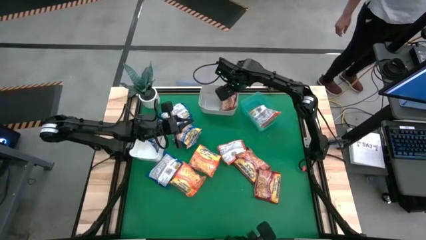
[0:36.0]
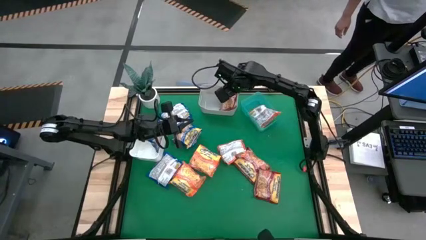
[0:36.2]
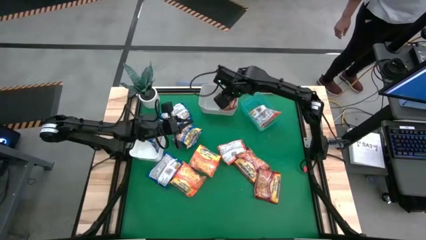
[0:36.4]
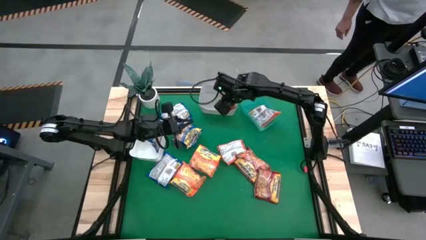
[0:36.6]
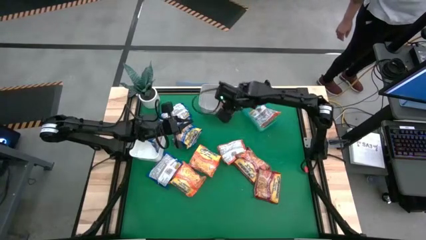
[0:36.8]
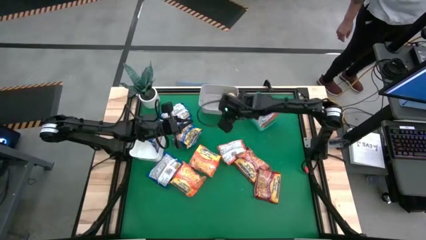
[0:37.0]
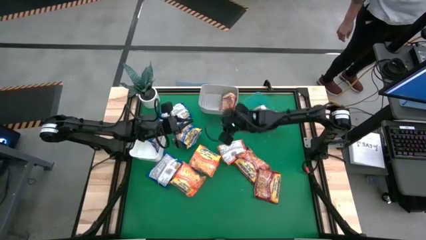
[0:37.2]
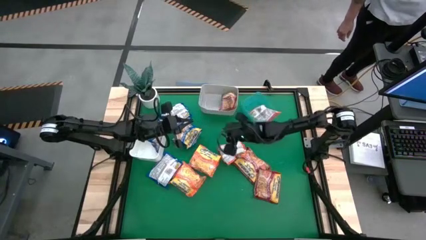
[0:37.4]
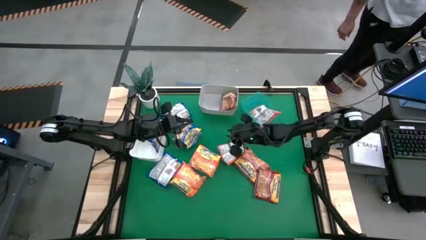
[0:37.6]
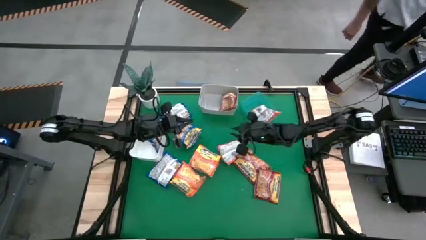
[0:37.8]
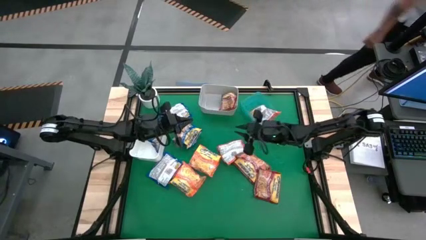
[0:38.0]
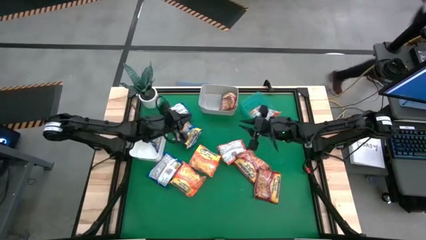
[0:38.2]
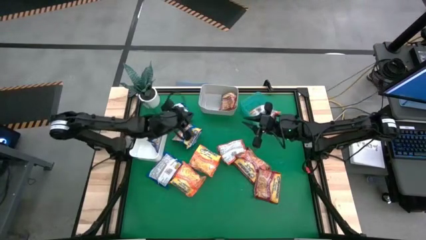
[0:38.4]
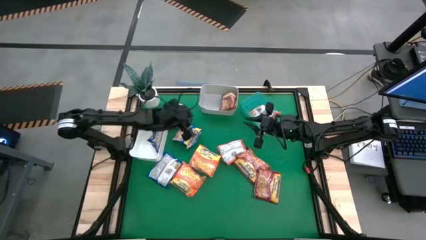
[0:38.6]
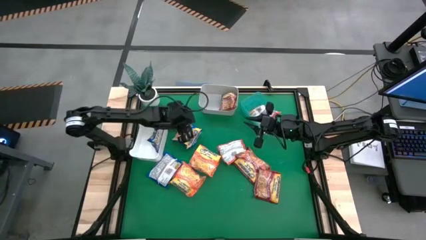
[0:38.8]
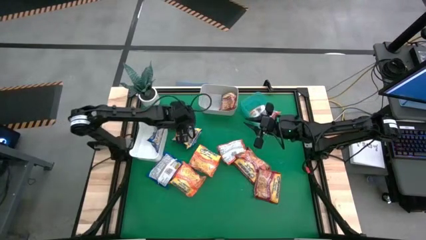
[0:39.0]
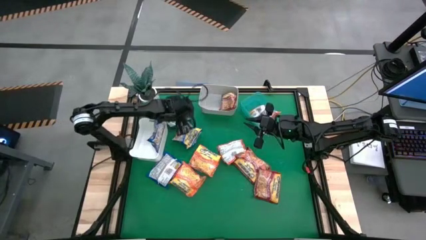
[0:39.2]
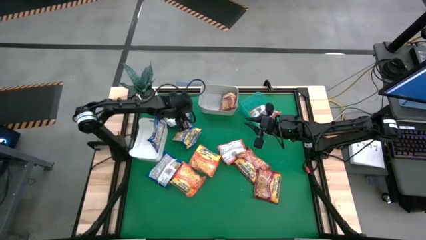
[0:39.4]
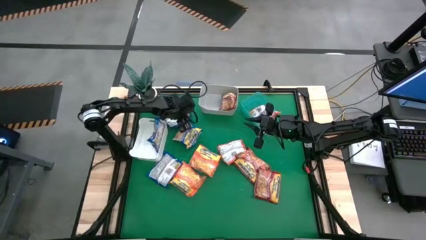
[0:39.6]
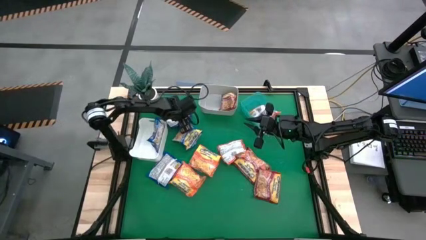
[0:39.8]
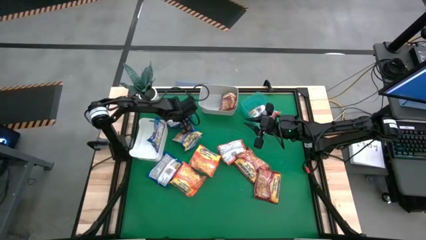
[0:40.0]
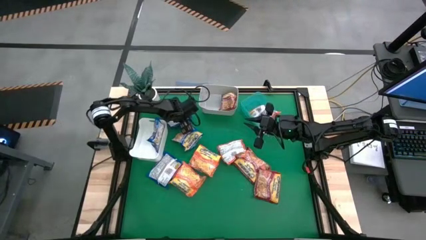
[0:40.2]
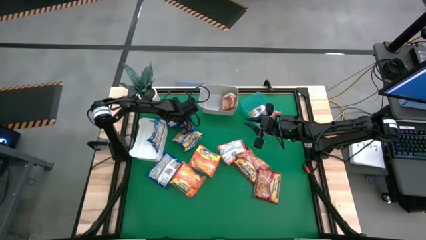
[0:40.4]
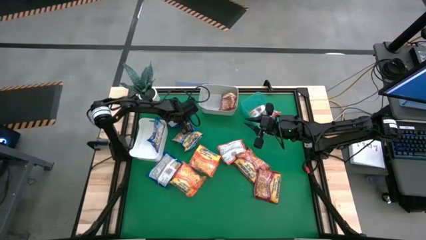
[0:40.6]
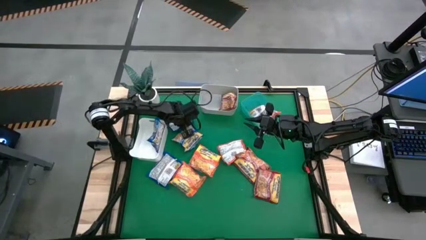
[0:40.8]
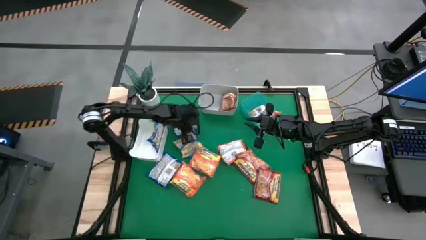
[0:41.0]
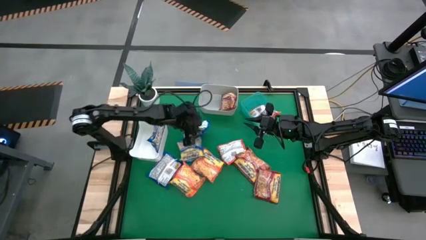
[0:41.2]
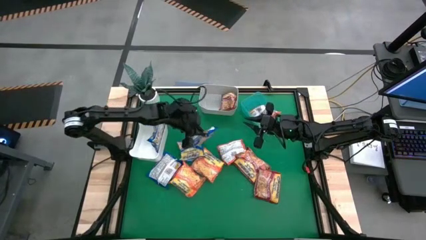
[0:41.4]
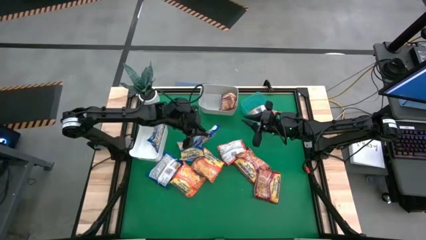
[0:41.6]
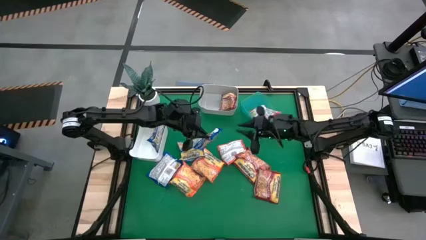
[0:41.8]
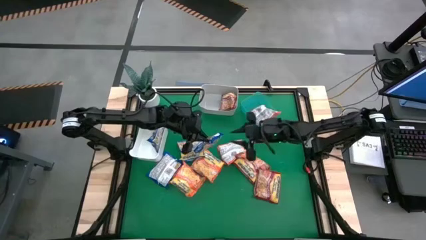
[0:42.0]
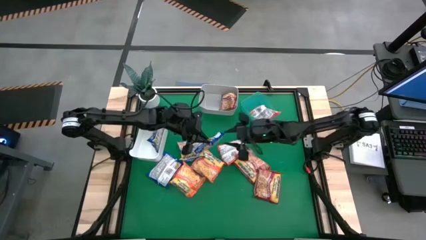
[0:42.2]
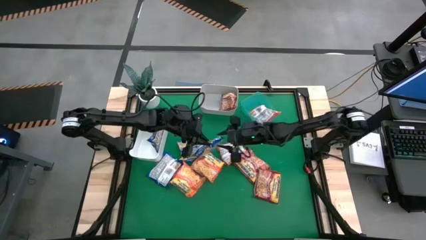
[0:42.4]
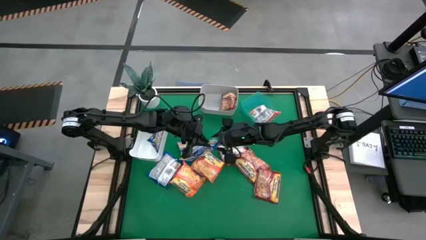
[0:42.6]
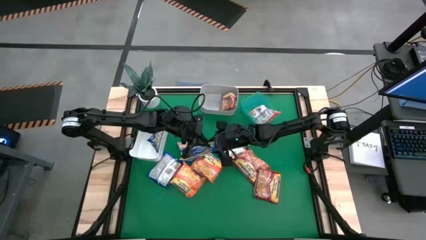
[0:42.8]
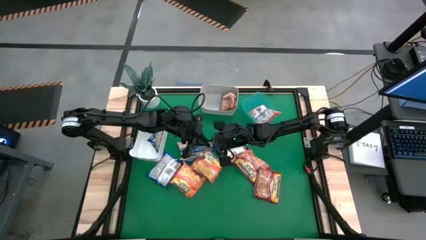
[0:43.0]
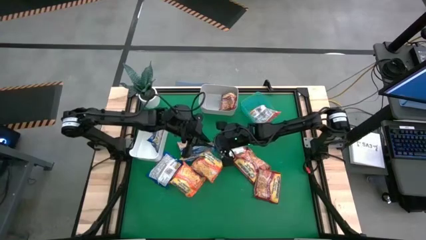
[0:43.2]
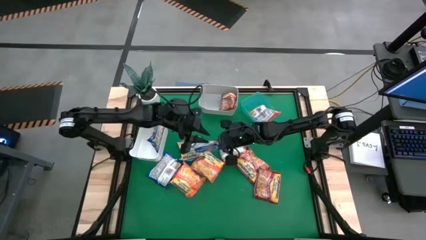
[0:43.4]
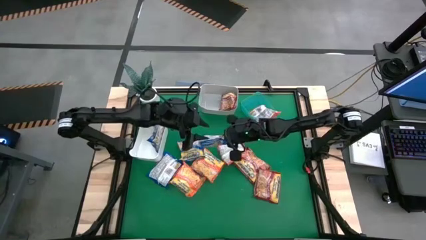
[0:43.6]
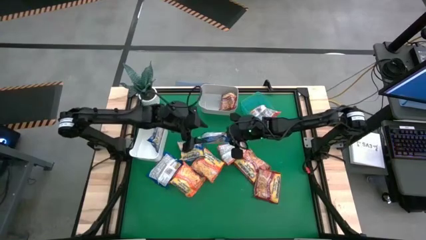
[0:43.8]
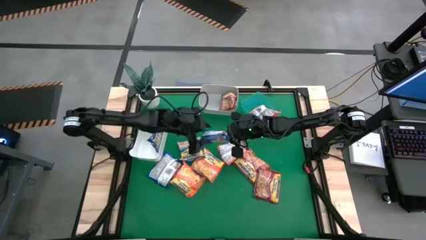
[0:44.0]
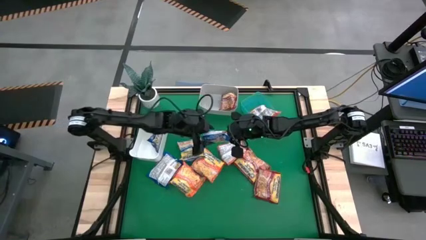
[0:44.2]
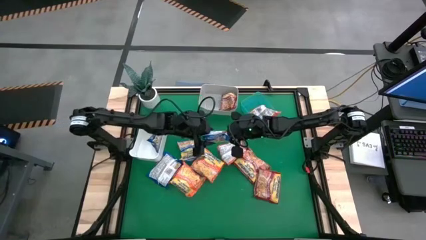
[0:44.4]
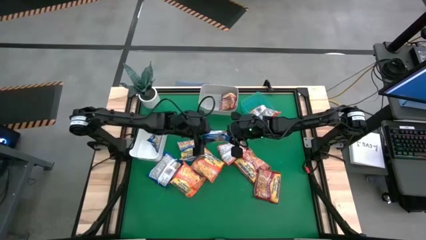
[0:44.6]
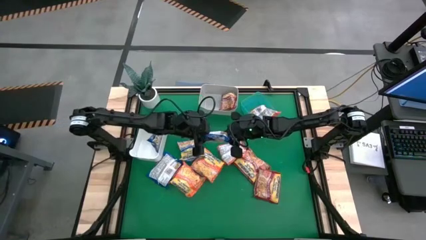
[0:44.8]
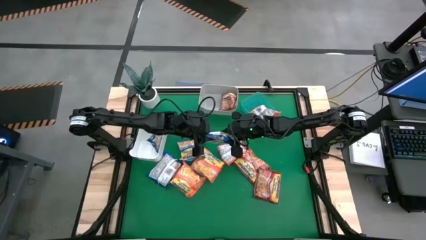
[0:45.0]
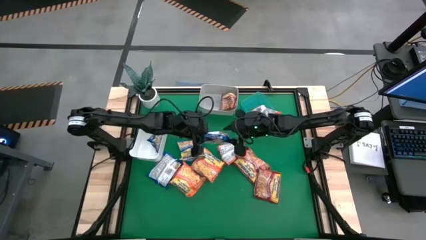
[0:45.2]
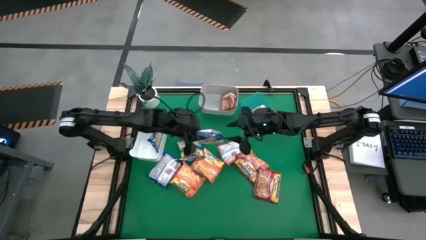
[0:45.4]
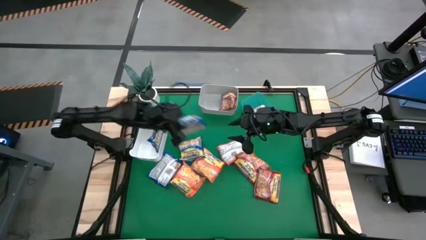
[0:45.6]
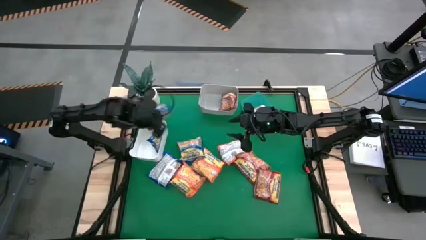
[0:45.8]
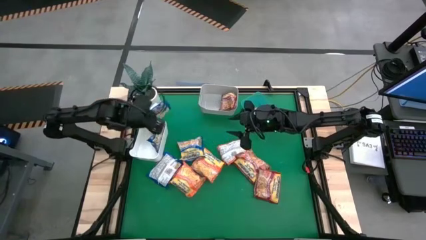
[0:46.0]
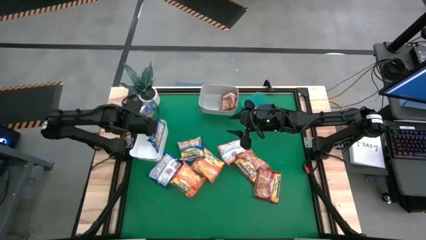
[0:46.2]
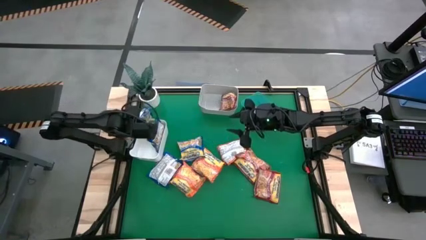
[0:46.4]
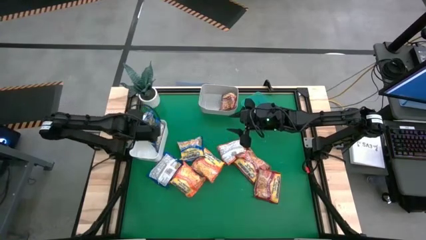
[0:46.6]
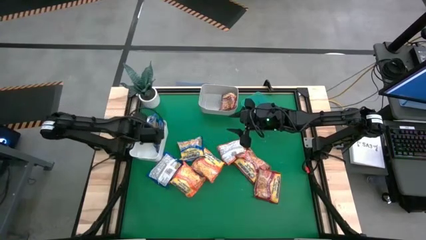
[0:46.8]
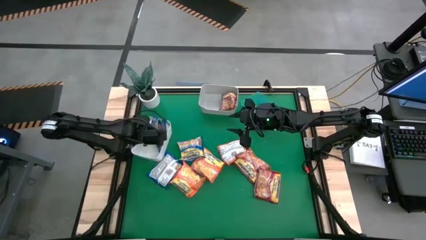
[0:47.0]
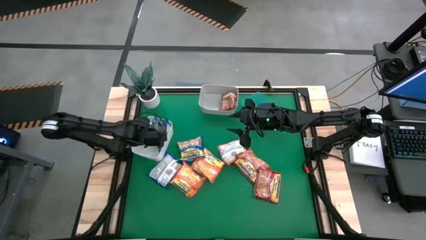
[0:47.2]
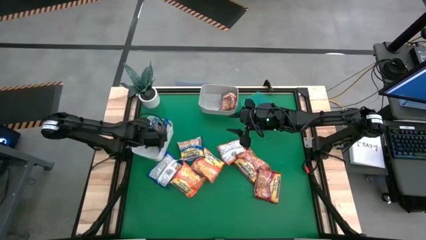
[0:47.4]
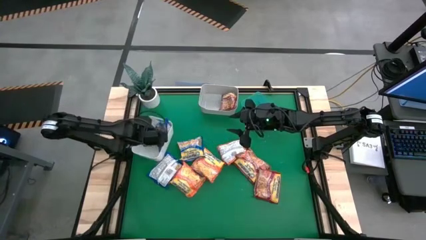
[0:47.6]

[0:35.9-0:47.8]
Task: Sort Maruchan noodles
Put the blue noodle pack into the white bin

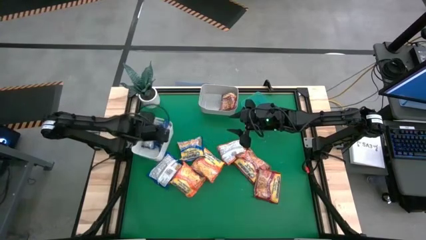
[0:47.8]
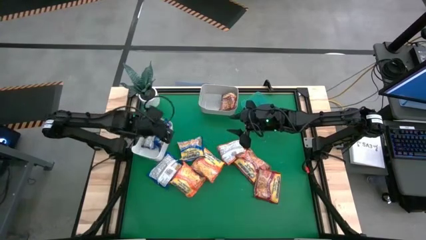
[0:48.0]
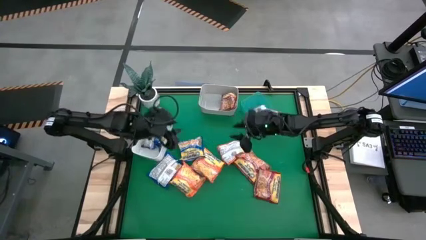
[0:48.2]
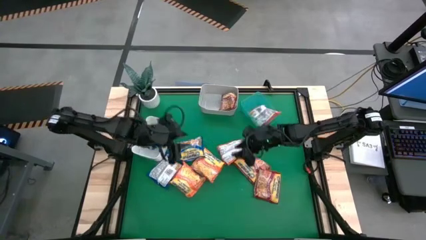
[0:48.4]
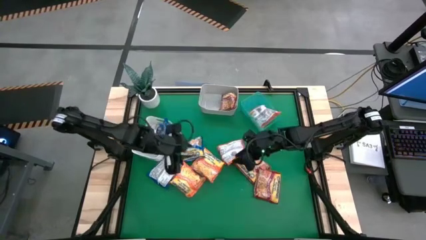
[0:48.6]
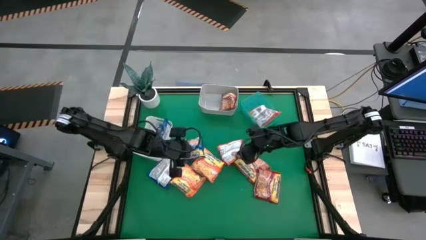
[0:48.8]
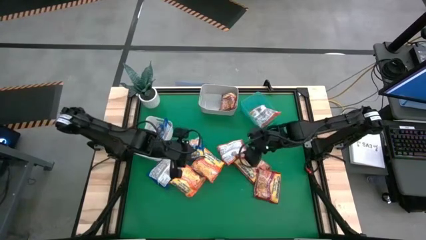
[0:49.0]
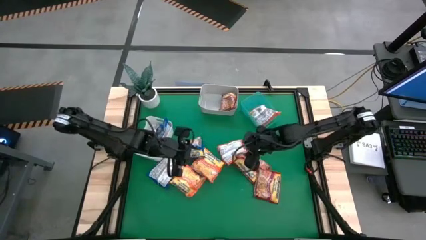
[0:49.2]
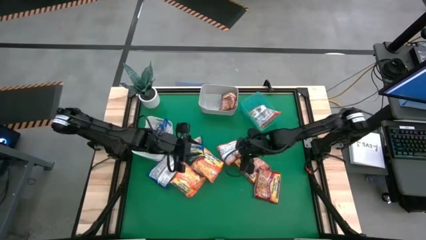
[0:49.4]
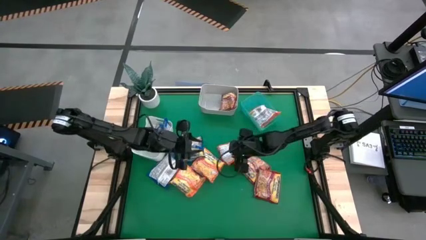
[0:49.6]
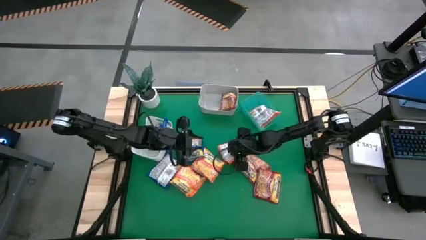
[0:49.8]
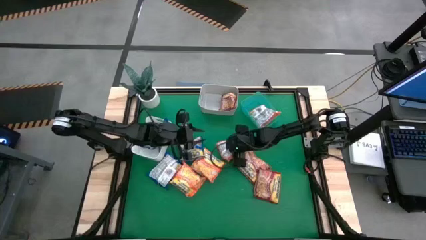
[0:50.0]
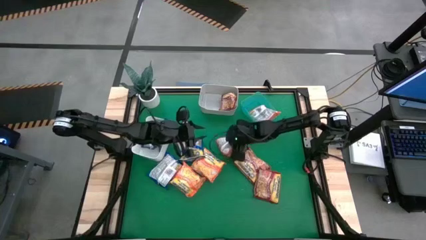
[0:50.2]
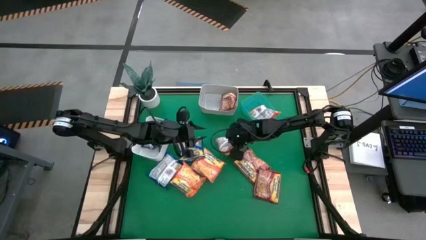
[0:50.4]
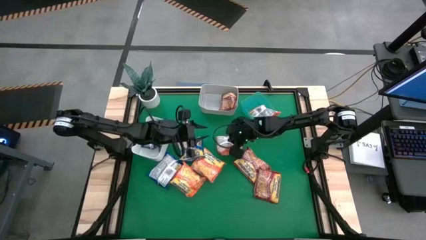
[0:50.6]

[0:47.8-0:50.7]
Put the orange noodle pack into the green bin
